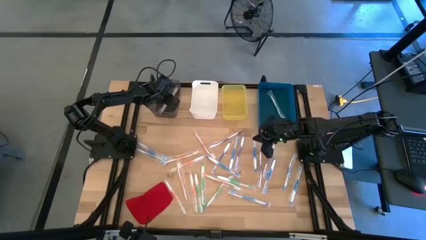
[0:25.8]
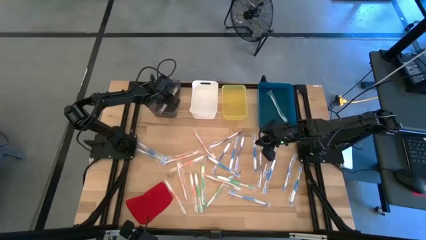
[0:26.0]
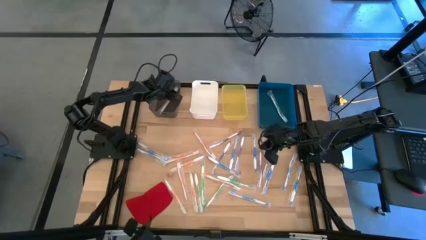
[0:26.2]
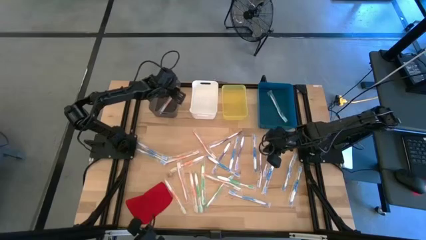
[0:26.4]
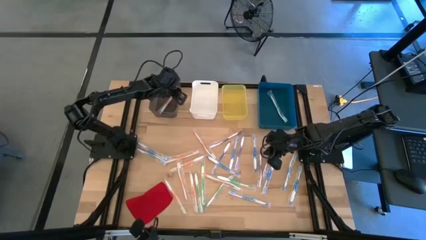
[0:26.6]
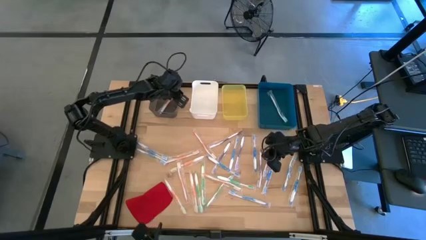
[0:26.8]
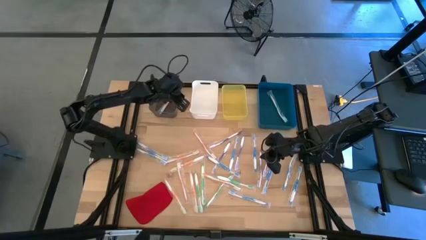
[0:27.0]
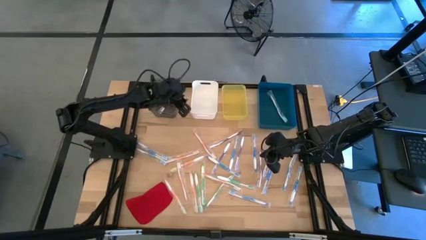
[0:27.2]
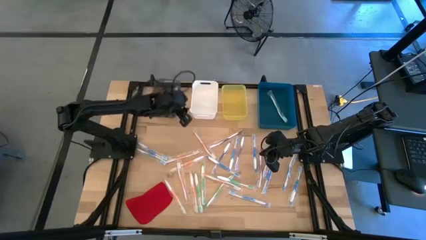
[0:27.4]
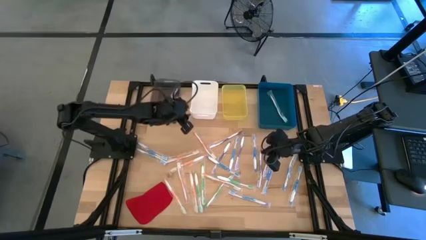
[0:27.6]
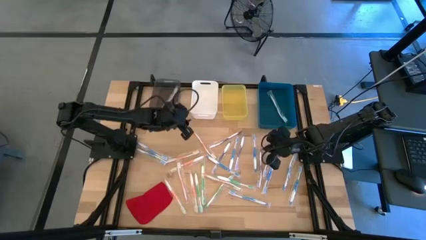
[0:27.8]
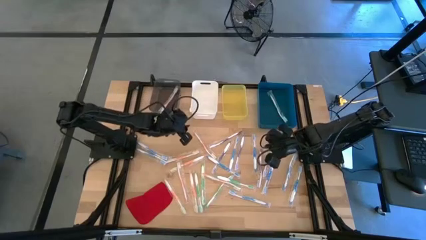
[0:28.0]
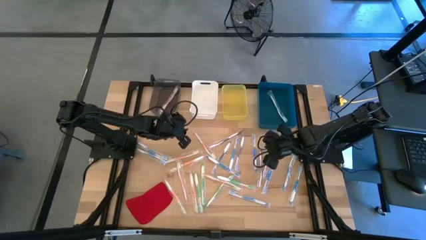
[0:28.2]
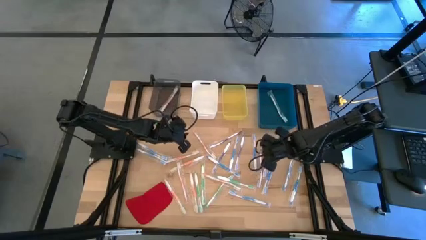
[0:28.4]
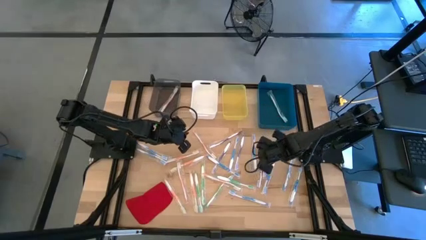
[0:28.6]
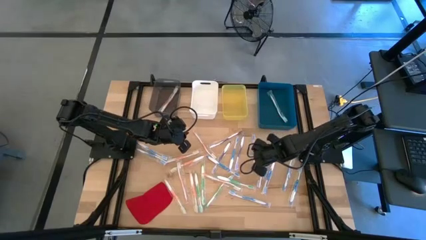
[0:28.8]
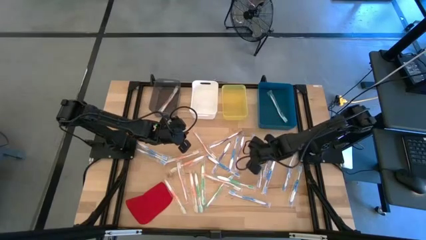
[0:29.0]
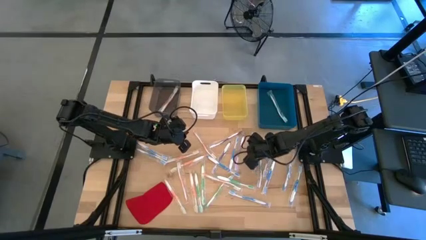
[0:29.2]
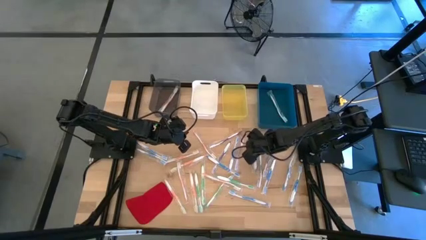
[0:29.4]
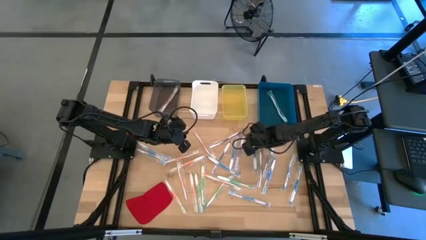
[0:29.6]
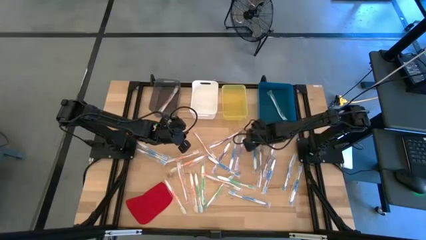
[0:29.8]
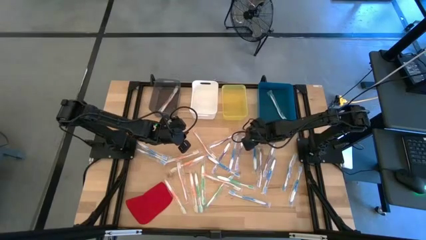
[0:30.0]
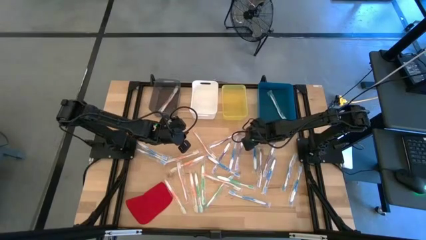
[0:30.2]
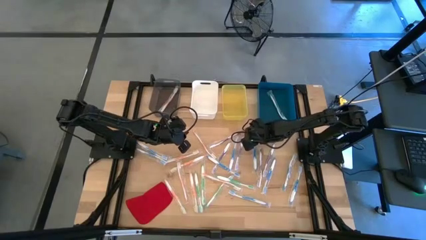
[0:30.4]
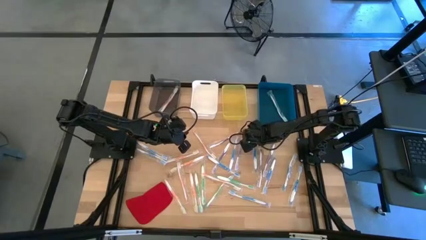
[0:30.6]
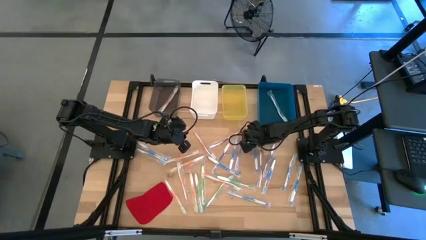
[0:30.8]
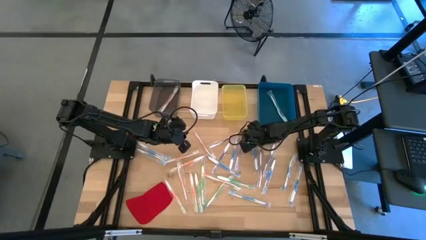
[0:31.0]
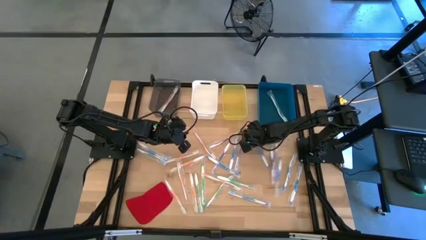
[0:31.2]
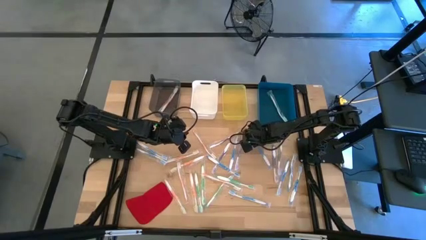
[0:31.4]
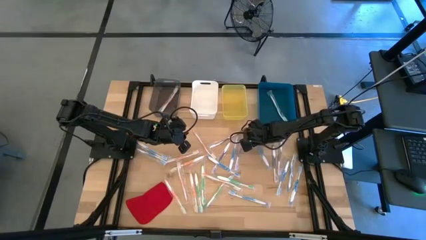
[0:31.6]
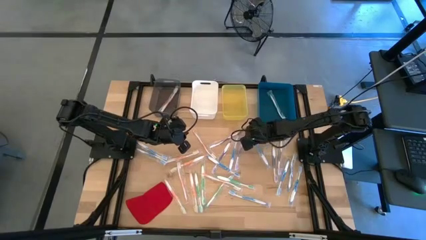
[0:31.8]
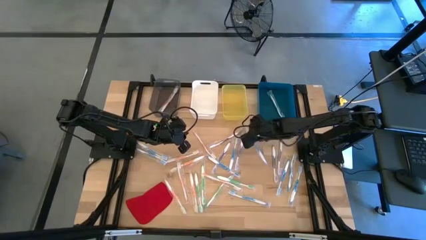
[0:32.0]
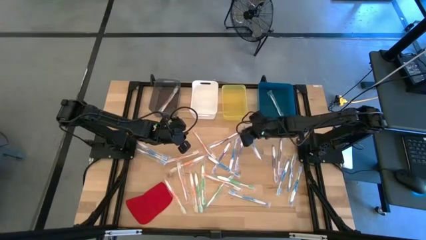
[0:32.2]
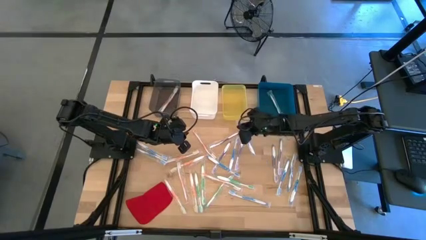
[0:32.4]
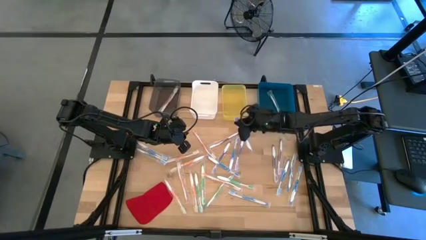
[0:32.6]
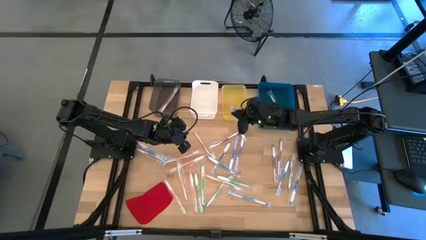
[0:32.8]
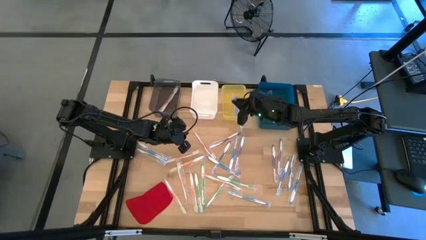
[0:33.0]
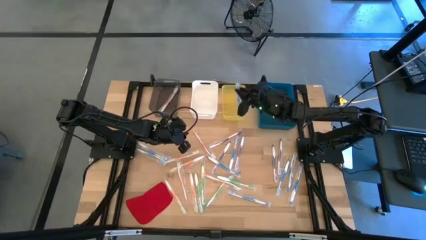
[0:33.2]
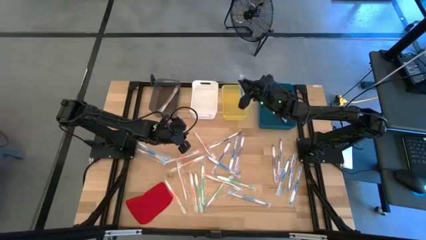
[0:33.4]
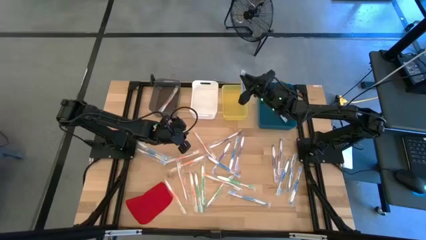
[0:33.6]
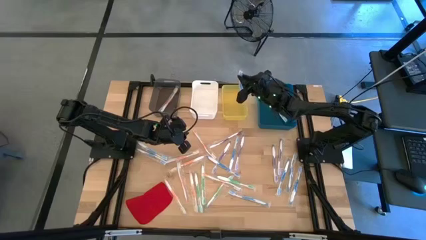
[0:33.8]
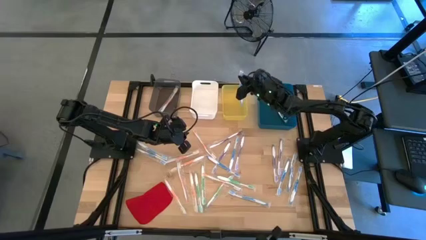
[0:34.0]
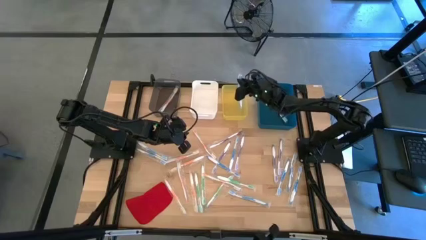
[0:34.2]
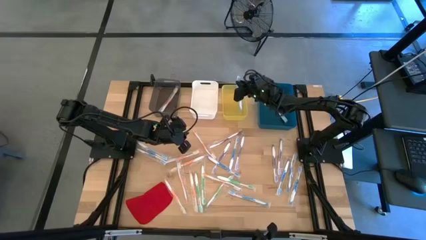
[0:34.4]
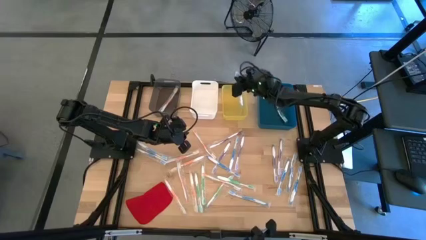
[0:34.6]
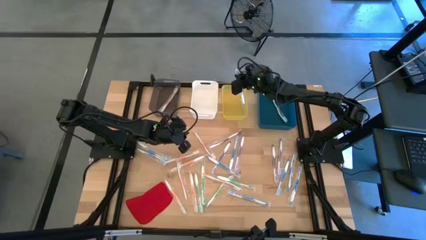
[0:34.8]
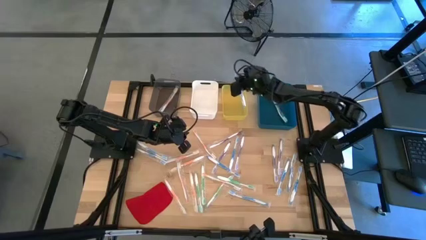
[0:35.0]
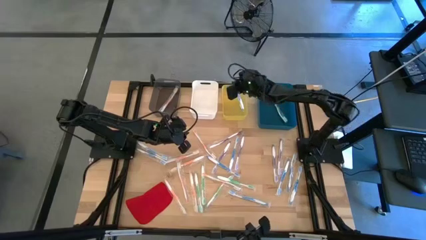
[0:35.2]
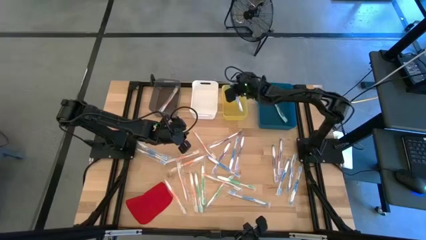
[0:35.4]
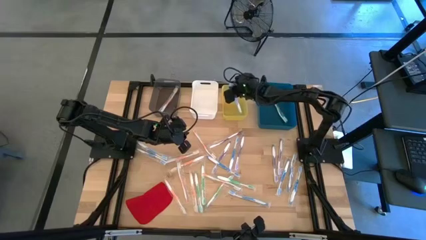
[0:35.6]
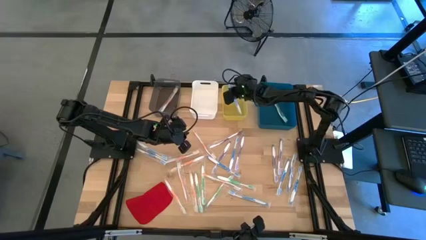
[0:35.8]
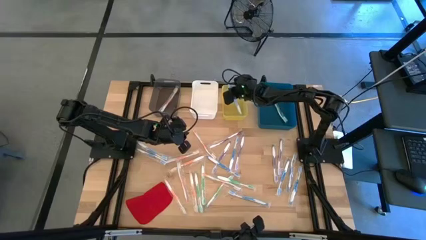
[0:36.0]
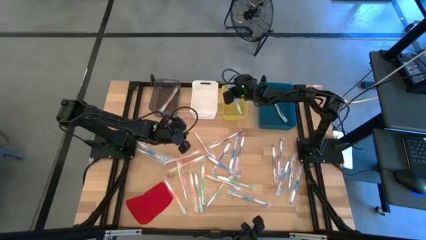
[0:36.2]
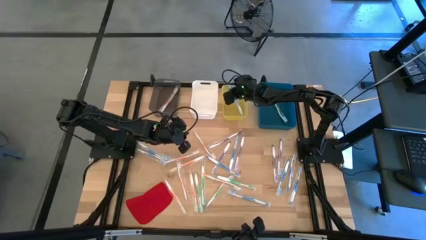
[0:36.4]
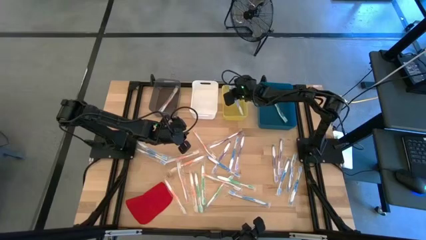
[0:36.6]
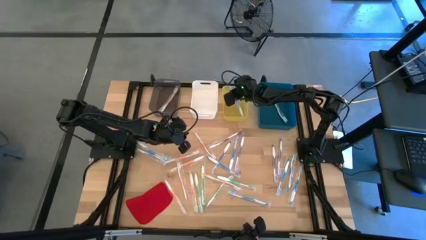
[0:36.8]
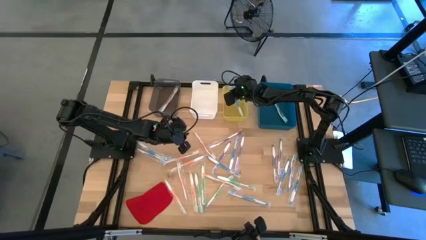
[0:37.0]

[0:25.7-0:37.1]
Task: Pick & Place Toothbrushes
Put the blue toothbrush into the yellow bin

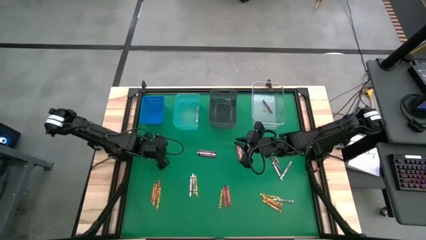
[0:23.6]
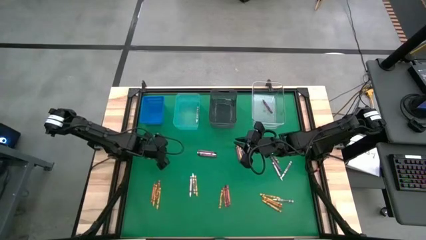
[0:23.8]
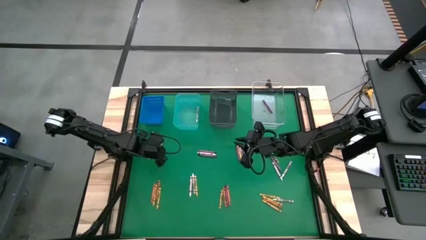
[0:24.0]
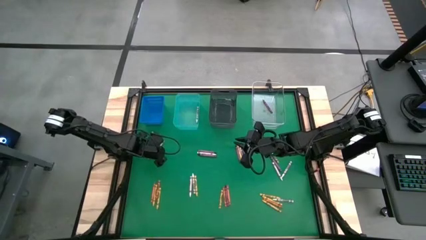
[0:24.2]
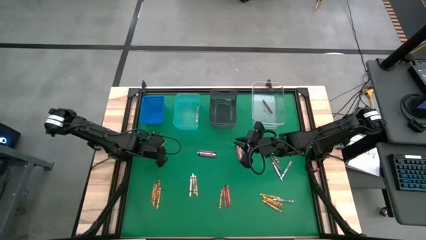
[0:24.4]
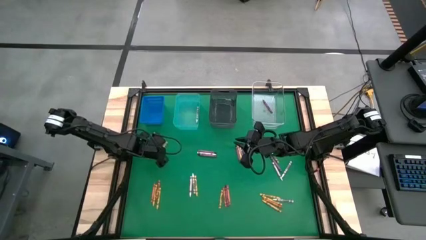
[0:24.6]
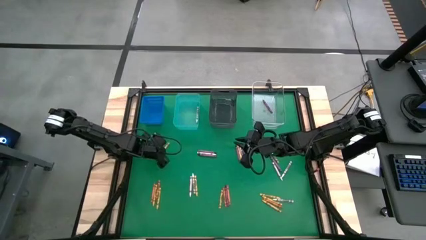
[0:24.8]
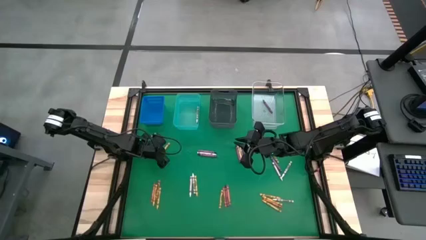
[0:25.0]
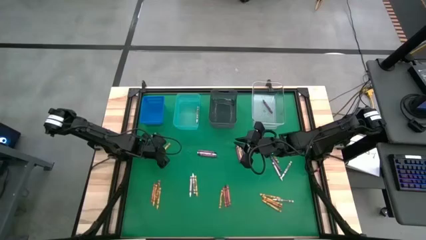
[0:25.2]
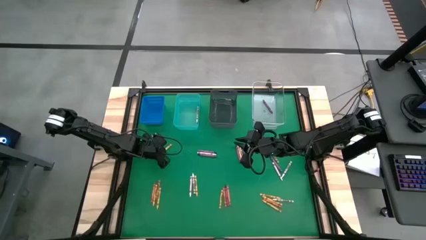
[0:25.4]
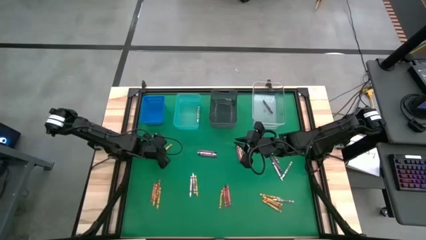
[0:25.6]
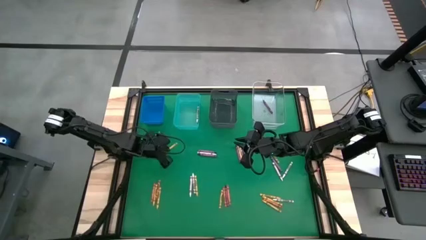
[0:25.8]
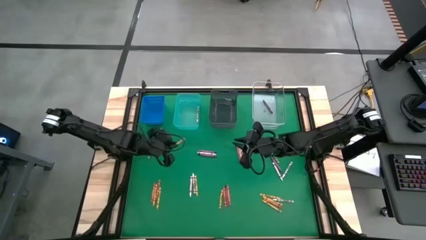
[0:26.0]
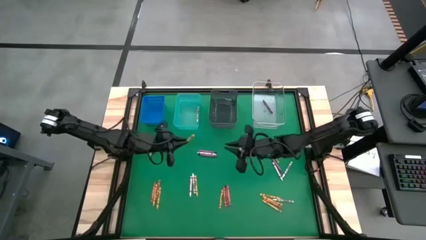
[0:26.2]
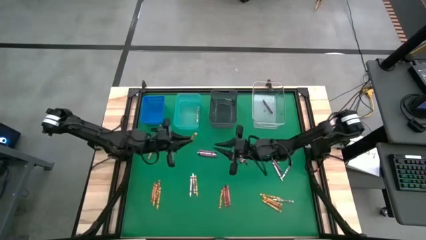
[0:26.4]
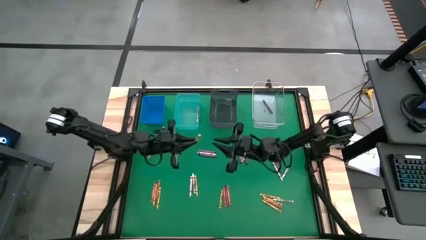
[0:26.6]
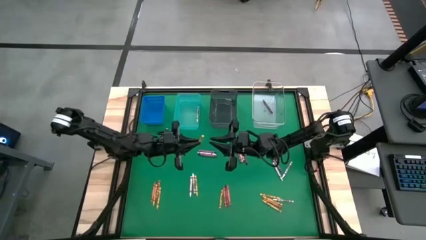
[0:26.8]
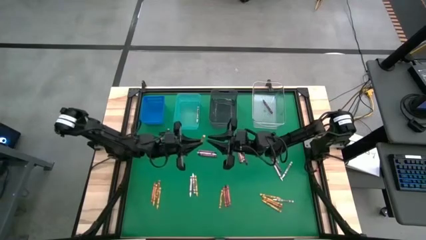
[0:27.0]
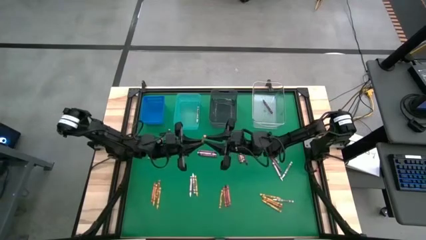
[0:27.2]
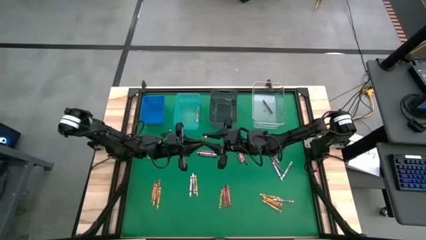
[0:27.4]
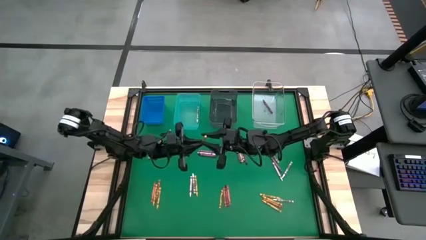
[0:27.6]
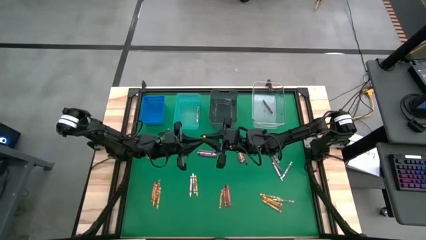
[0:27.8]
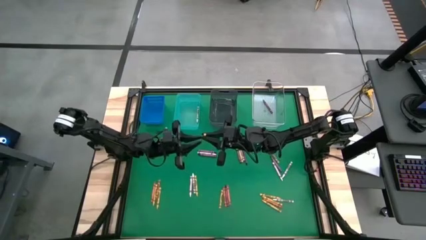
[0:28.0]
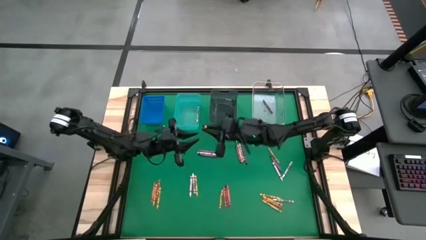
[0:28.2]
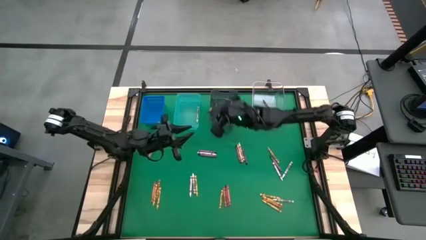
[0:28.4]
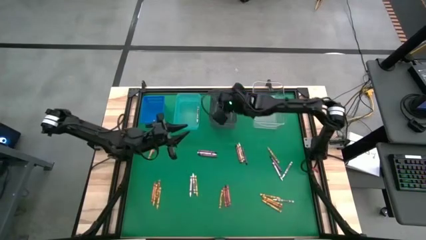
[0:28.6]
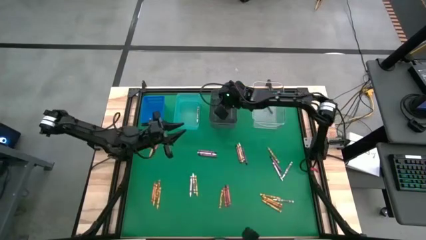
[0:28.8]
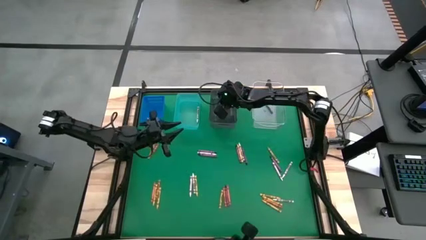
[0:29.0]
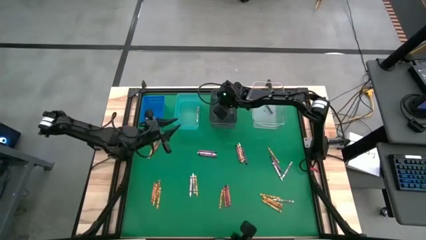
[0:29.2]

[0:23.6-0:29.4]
Task: Sort crayons
Put the yellow crayon into the black bin
